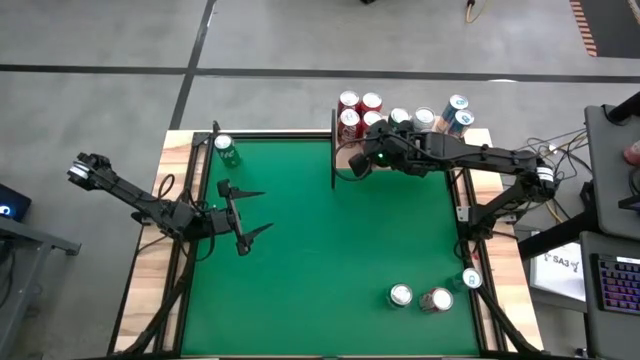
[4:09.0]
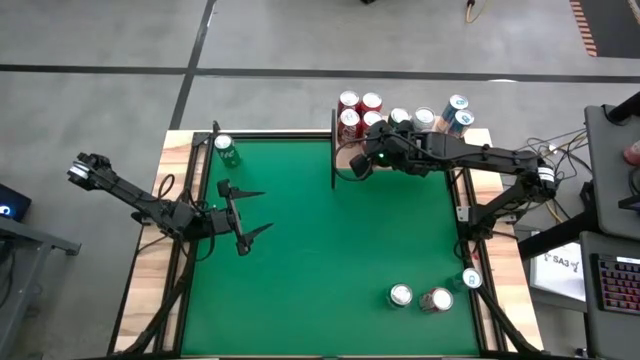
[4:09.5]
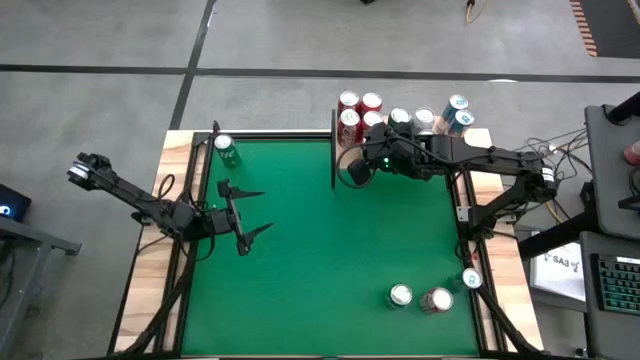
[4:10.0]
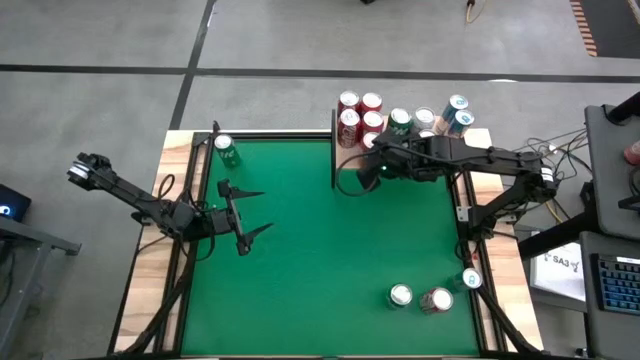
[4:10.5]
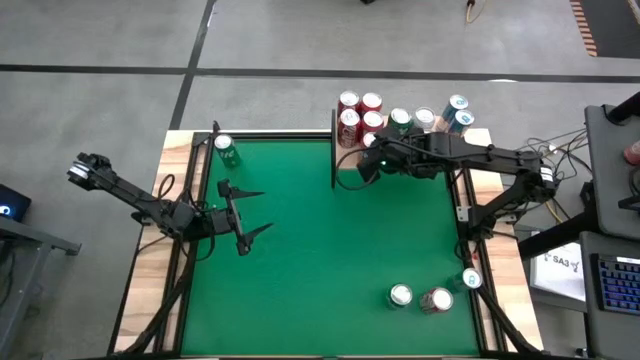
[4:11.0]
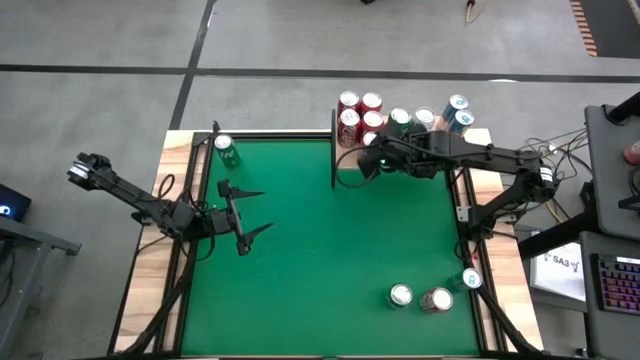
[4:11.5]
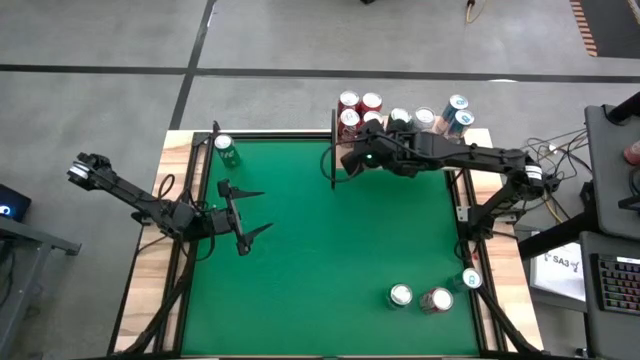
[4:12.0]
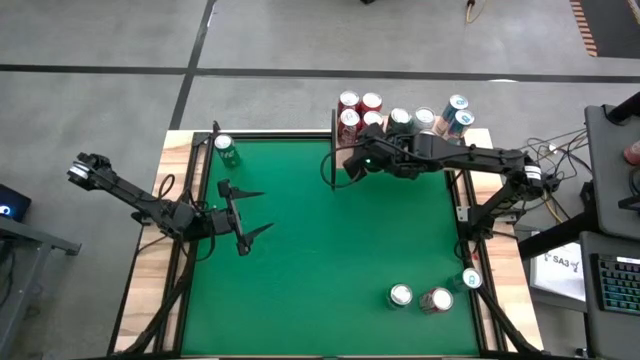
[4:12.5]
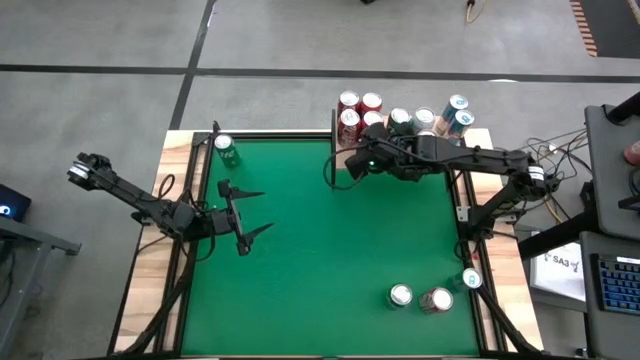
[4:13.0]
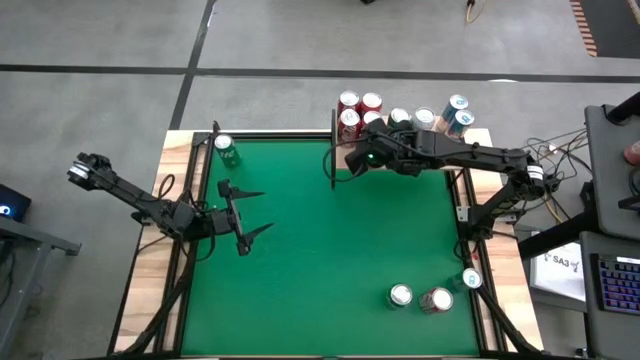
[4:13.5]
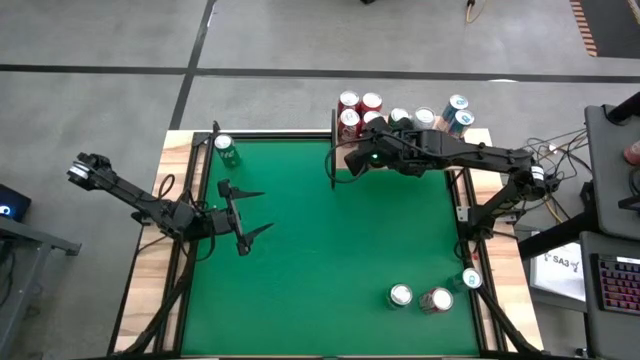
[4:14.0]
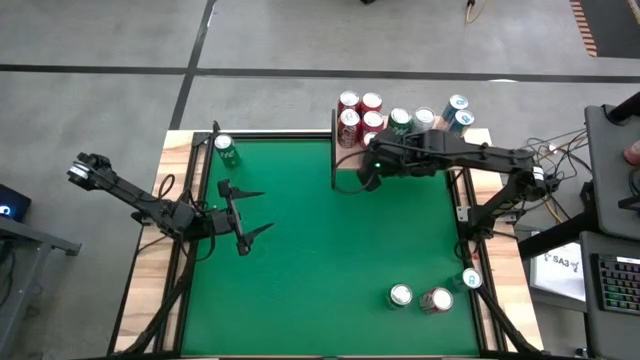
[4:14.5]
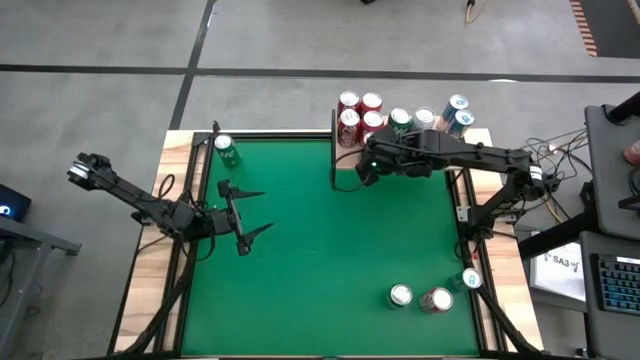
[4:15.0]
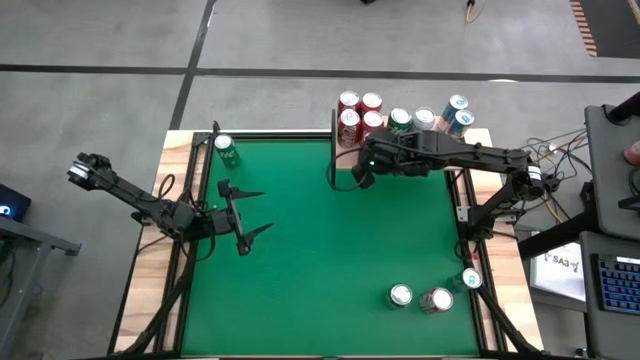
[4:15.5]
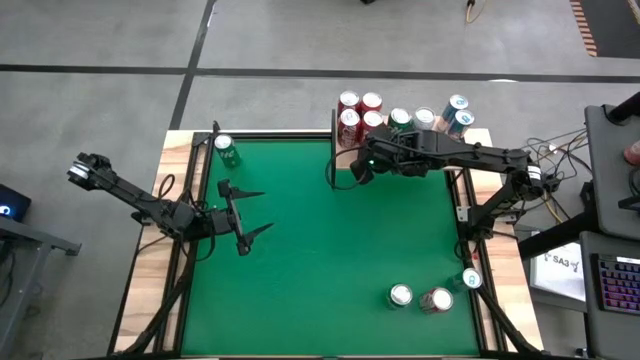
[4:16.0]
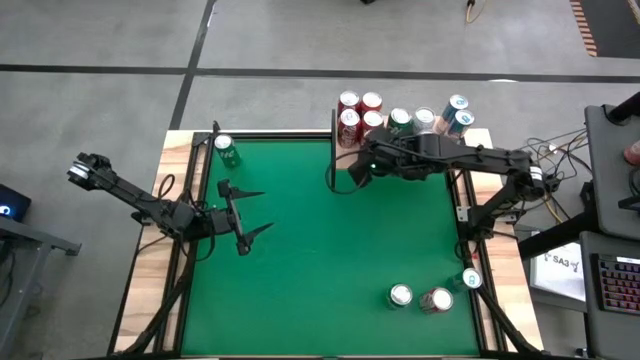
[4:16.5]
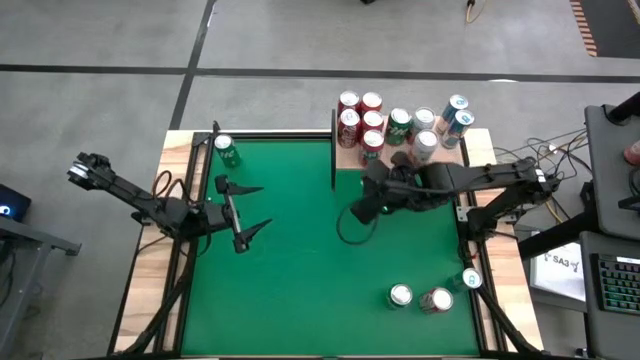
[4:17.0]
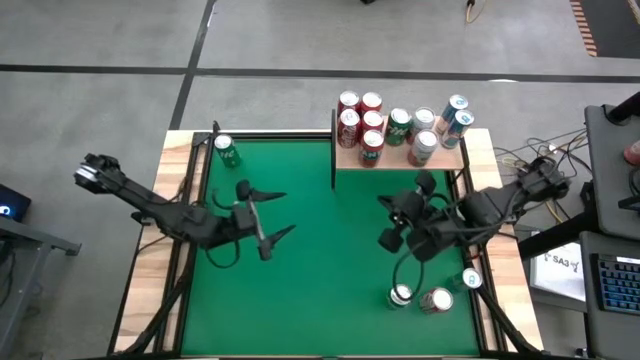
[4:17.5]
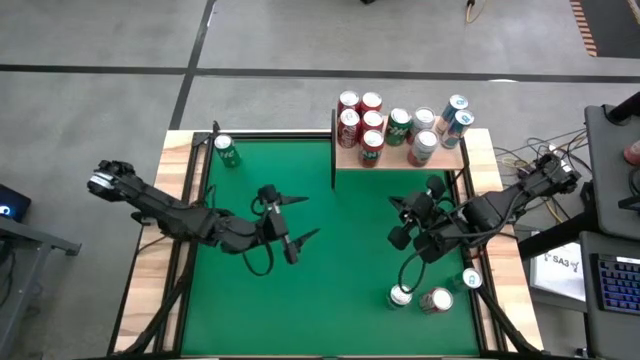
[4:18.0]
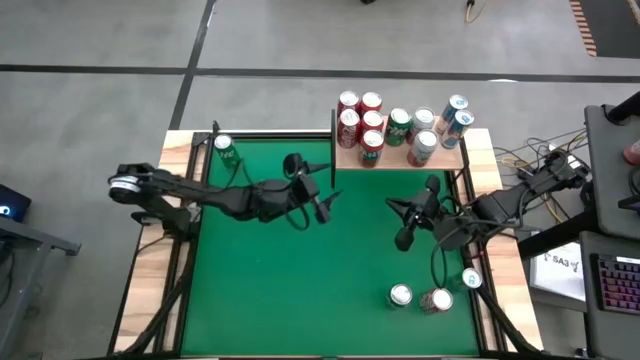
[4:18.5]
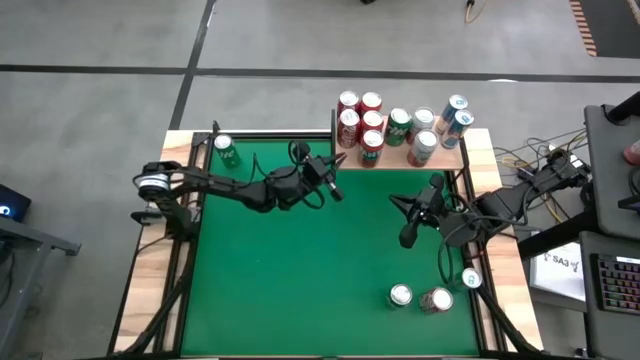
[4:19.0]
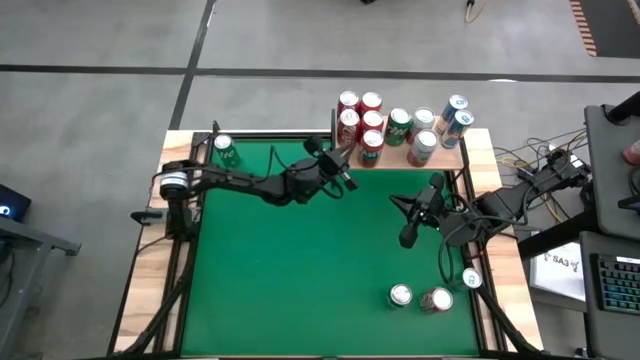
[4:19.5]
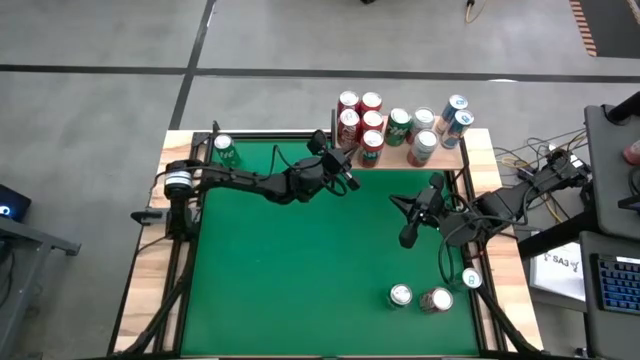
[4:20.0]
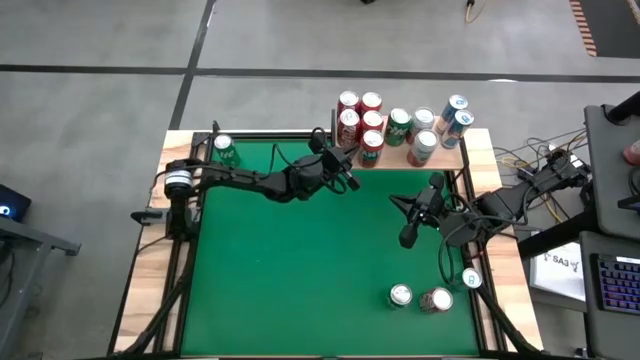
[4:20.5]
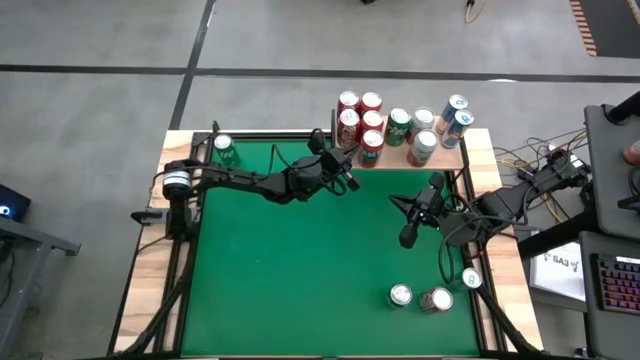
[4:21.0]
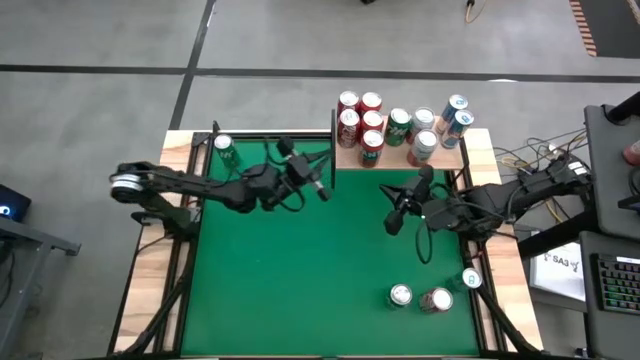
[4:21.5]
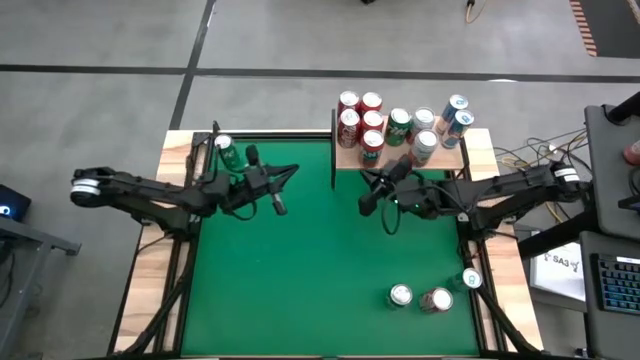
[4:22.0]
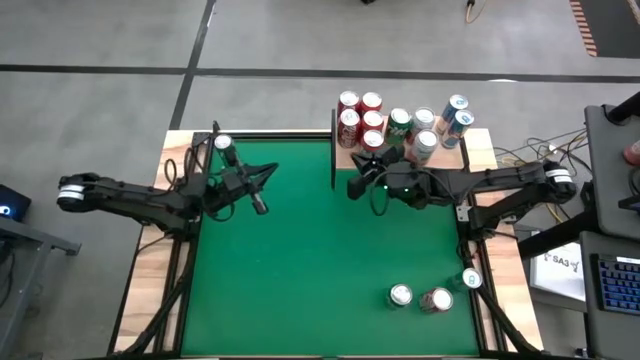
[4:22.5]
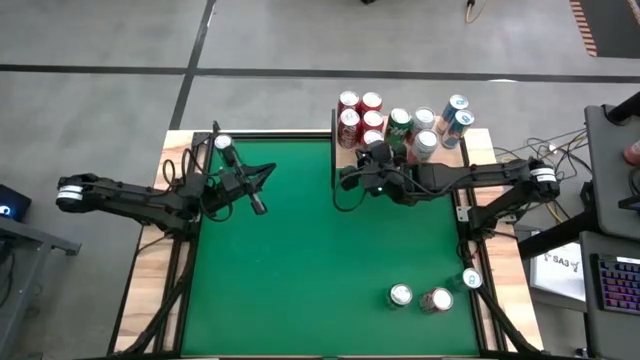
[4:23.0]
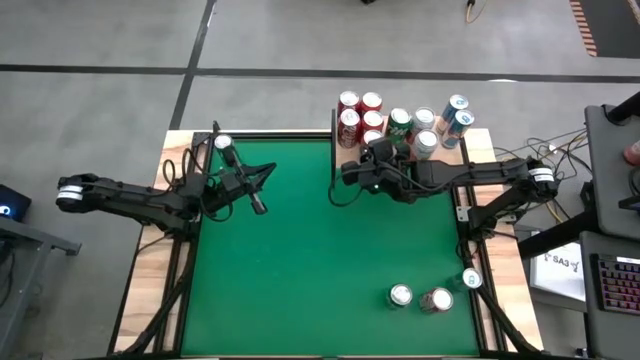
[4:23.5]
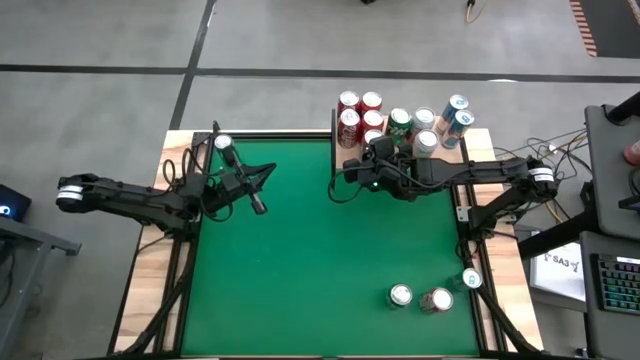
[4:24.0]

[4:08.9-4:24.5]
Task: Place canned beverage on shelf
Put the red soda can on the shelf aligned with the other red soda cans

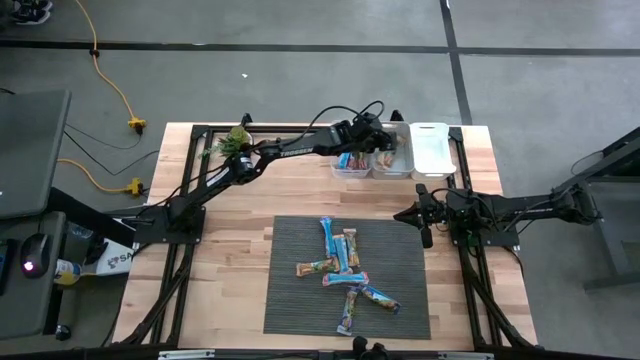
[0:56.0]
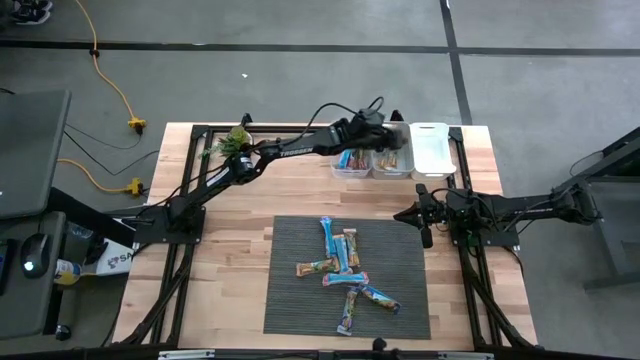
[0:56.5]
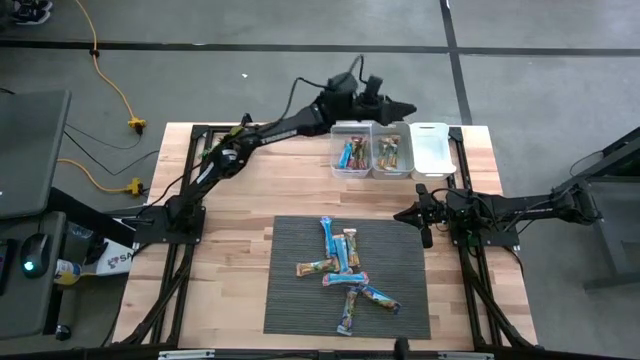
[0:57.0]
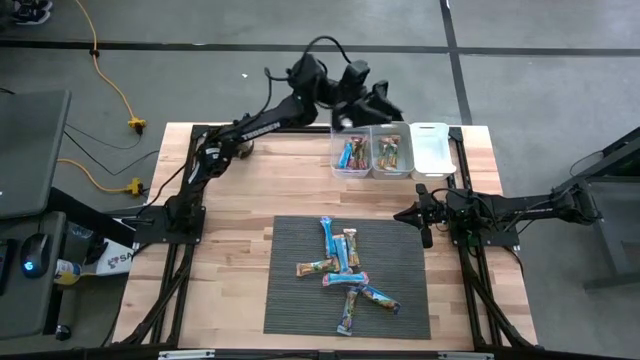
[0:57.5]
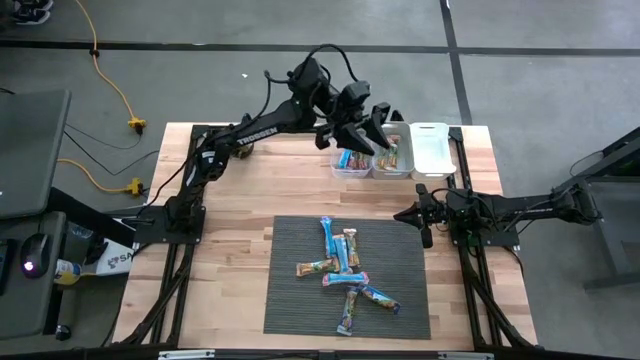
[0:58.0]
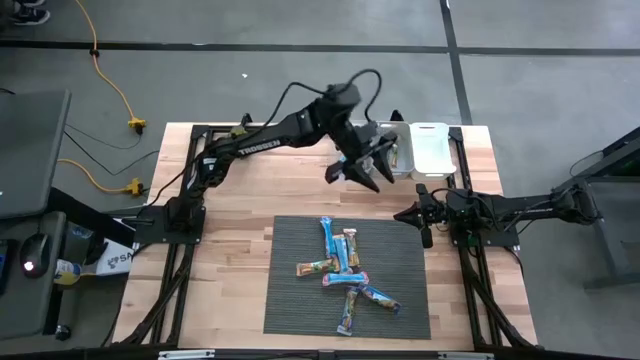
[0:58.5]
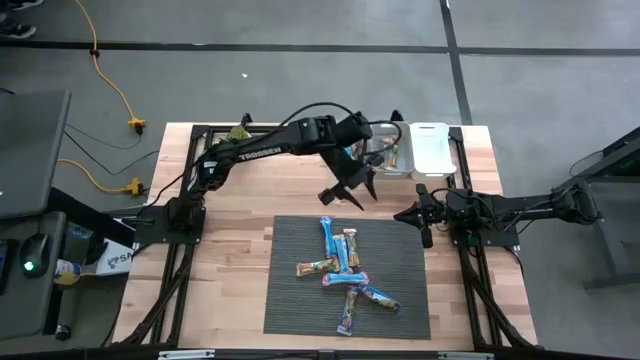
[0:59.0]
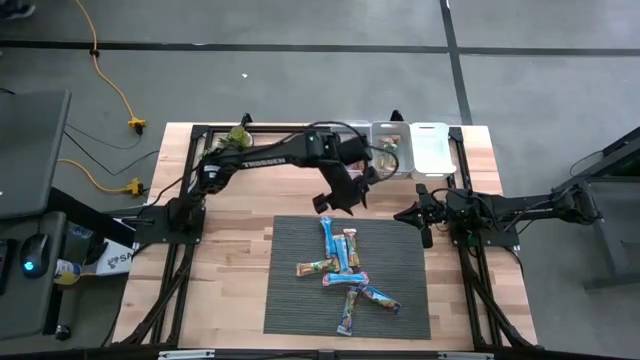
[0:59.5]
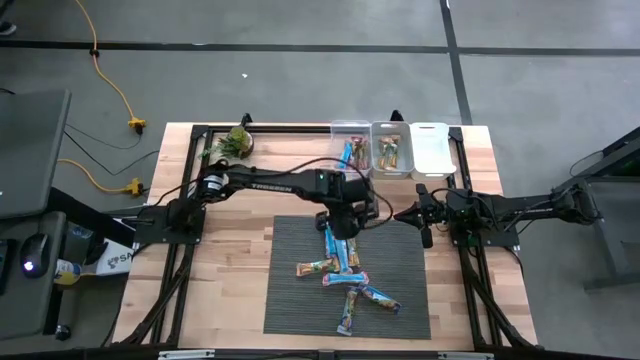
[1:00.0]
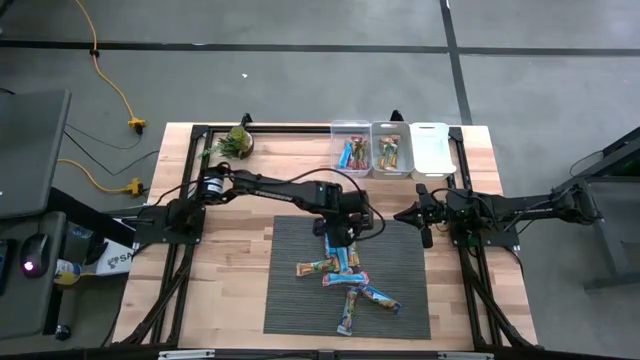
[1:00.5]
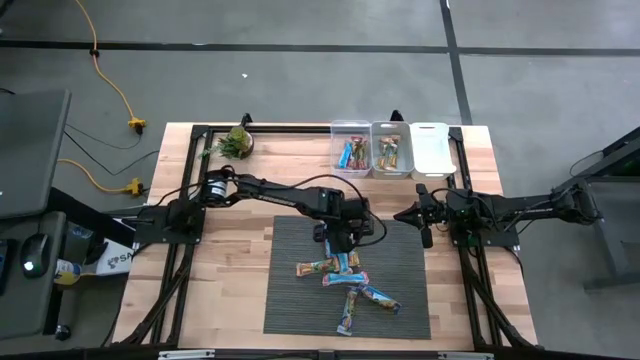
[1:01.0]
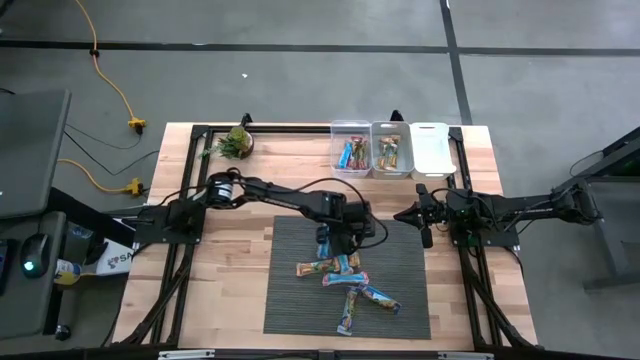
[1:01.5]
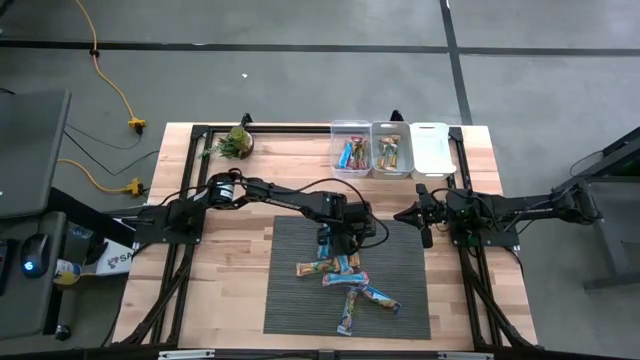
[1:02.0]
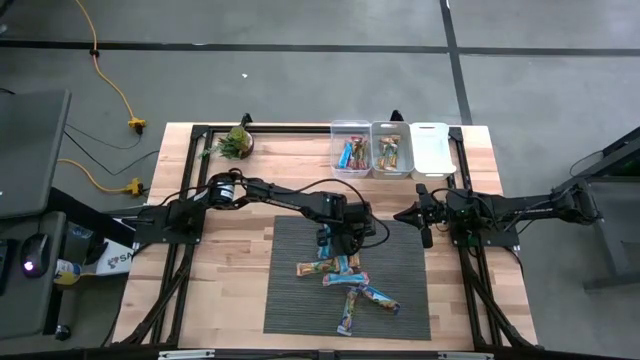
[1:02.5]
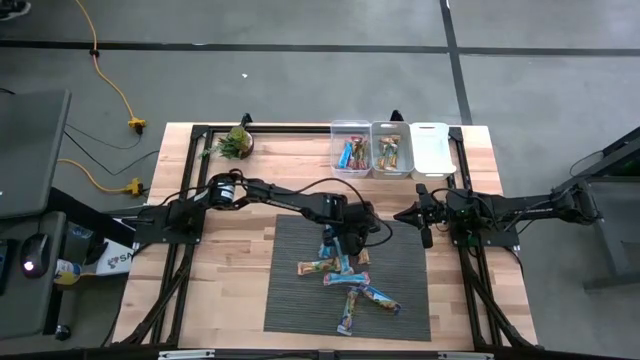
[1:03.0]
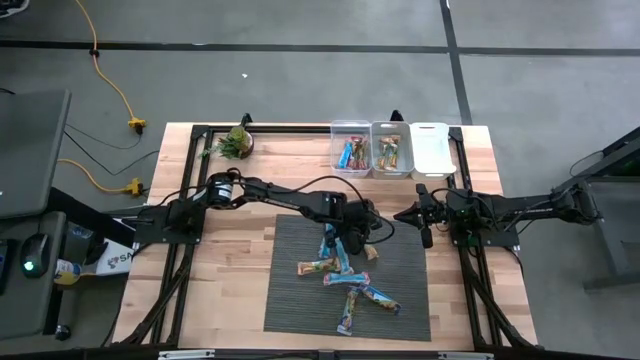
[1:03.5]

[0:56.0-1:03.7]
Task: Pick and place Granola Bars by type
Put the orange granola bar into the gray bin
